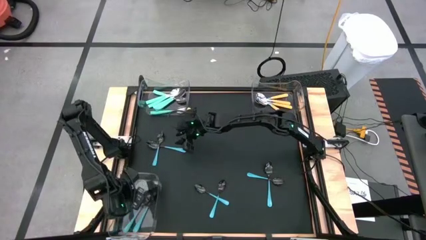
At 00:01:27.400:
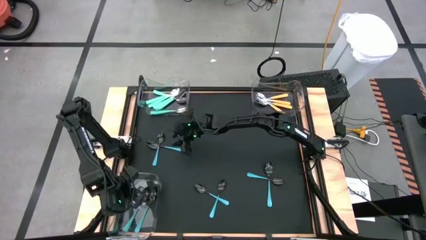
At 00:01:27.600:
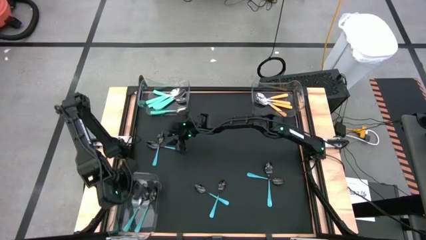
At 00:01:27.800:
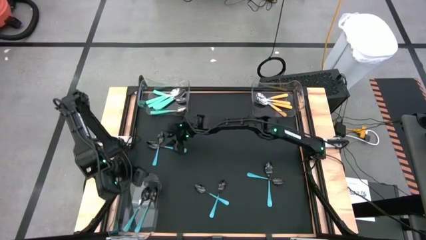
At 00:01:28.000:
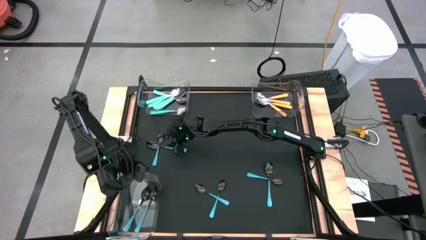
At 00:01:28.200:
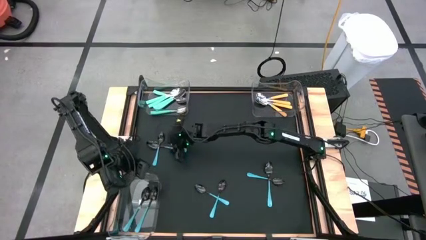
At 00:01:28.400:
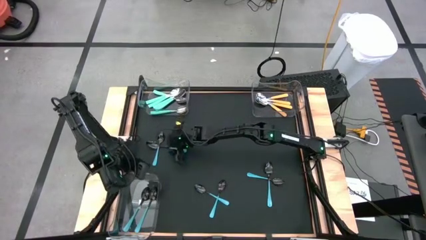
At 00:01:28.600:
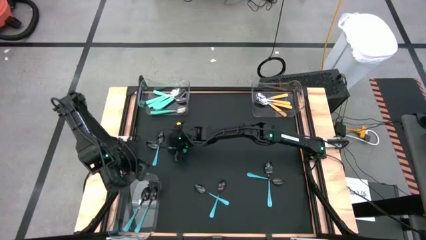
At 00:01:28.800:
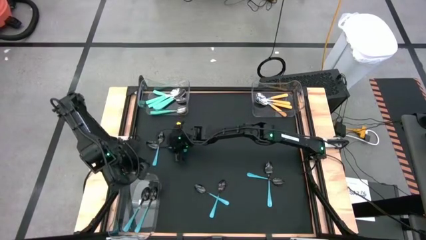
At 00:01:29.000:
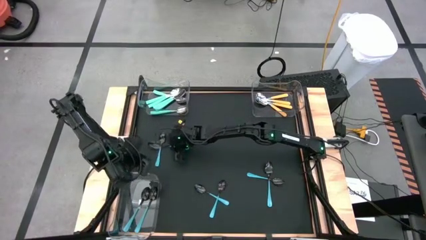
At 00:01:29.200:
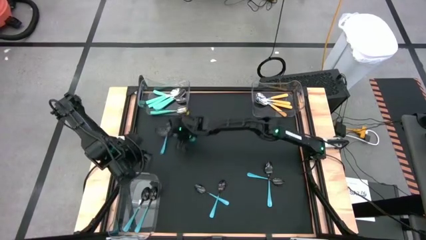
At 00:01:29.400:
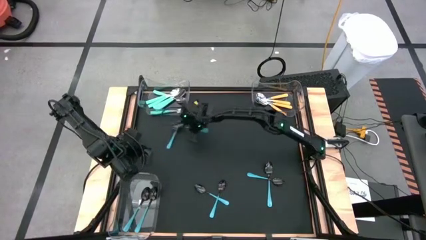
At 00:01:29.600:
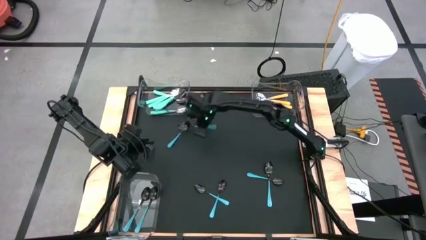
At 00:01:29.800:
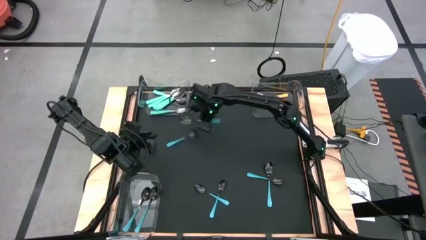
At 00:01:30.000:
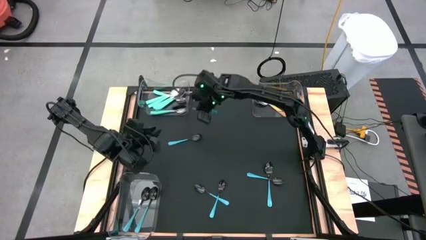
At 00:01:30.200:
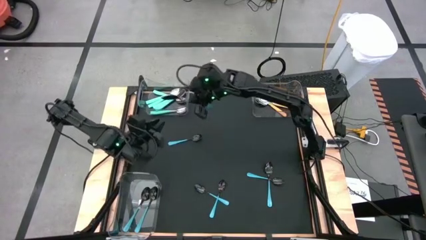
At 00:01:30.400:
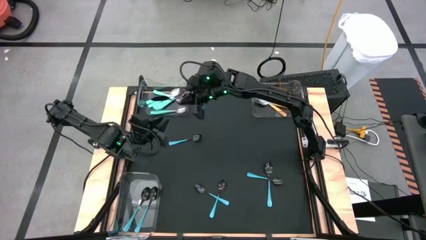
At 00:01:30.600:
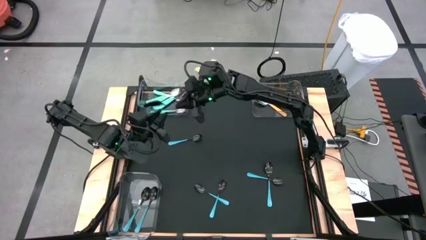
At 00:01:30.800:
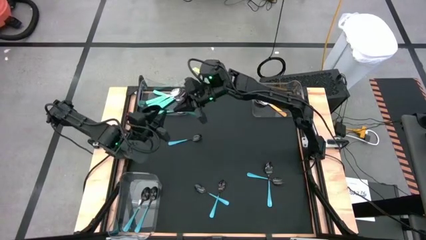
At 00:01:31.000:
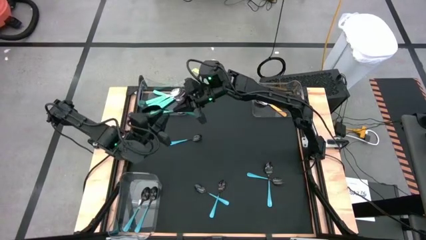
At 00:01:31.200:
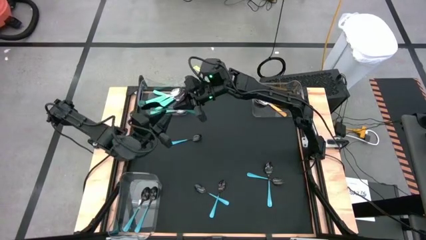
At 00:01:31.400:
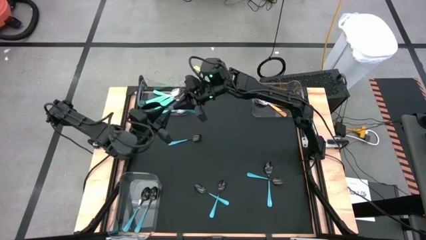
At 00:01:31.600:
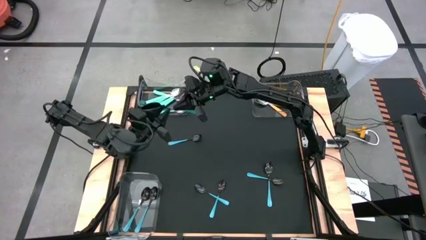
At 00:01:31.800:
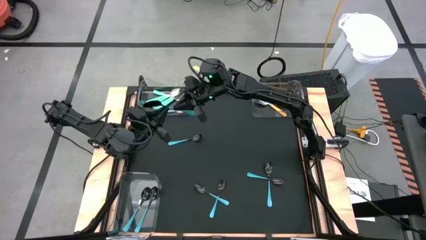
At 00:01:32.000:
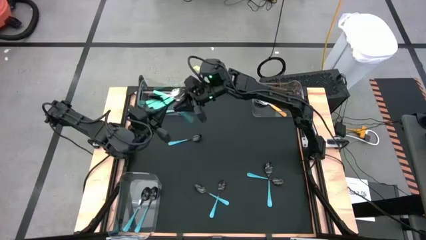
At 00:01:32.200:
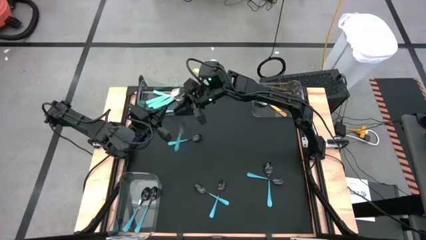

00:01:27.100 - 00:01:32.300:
Task: Sort silverware by color (type)
Put the blue spoon into the bottom transparent bin

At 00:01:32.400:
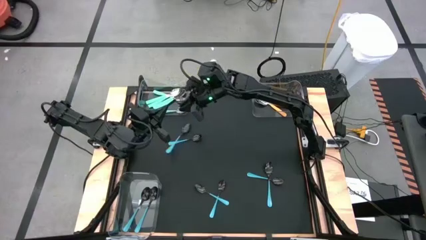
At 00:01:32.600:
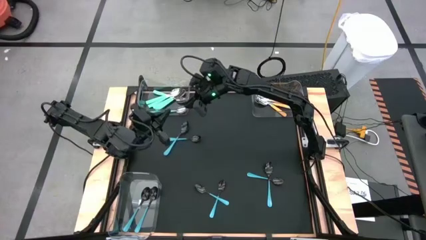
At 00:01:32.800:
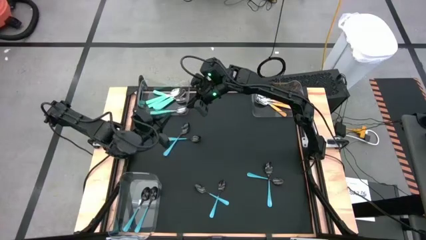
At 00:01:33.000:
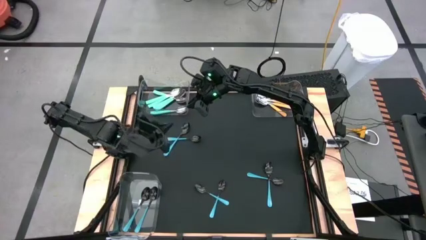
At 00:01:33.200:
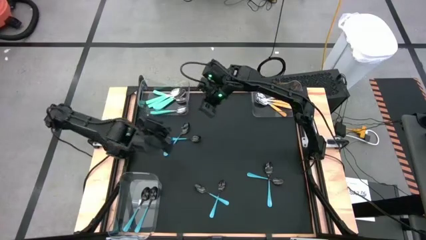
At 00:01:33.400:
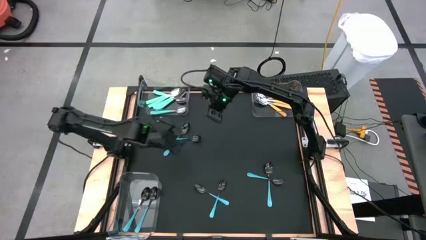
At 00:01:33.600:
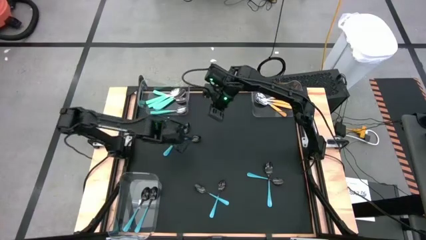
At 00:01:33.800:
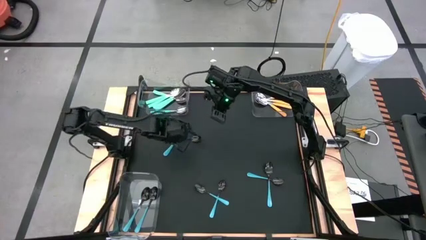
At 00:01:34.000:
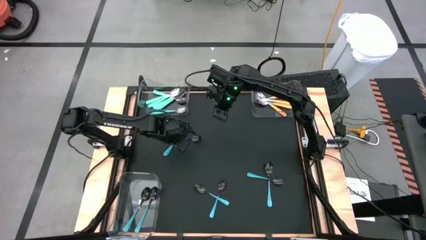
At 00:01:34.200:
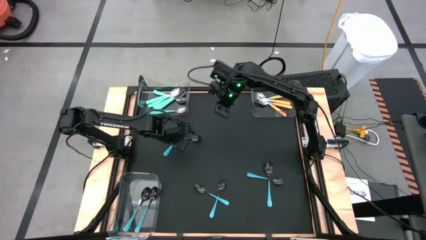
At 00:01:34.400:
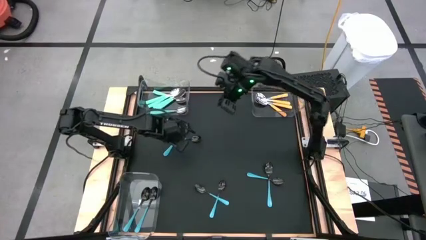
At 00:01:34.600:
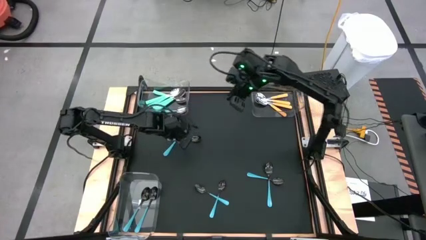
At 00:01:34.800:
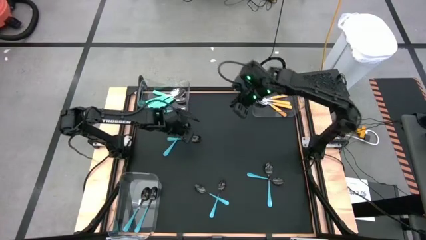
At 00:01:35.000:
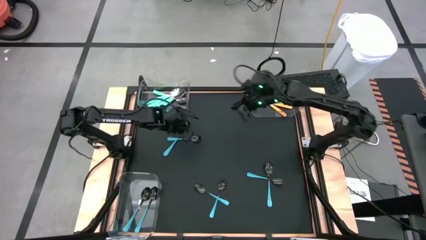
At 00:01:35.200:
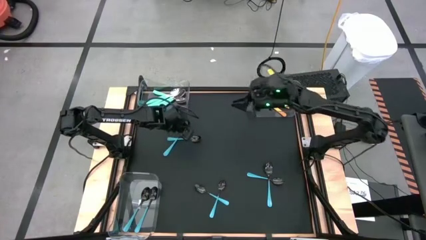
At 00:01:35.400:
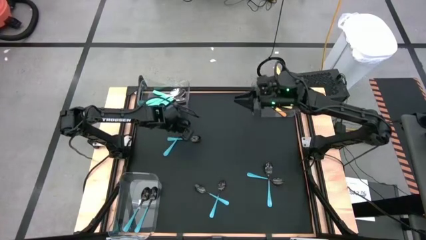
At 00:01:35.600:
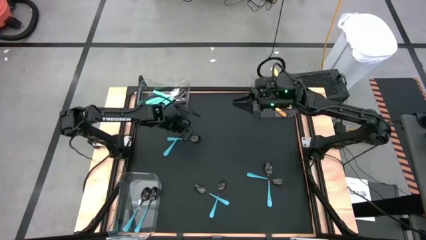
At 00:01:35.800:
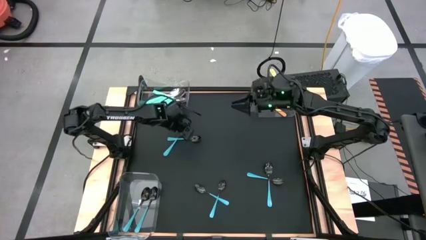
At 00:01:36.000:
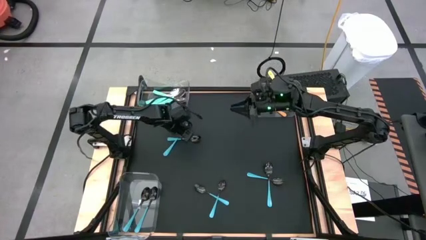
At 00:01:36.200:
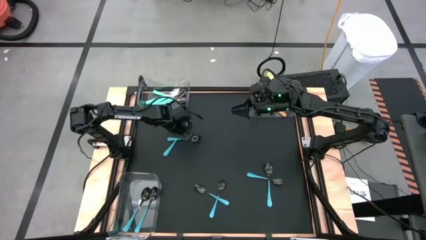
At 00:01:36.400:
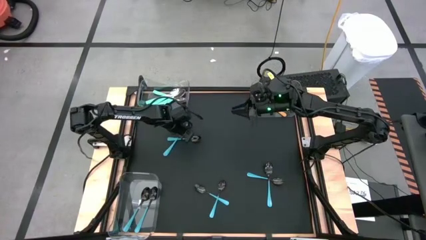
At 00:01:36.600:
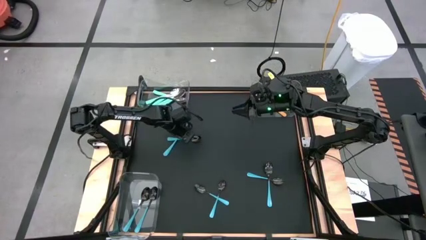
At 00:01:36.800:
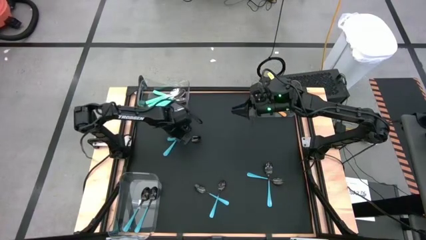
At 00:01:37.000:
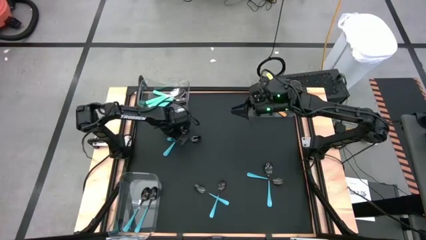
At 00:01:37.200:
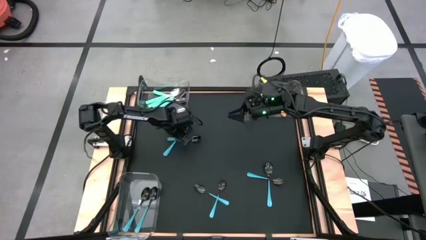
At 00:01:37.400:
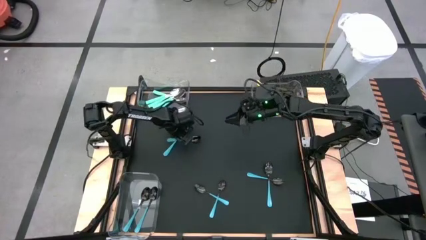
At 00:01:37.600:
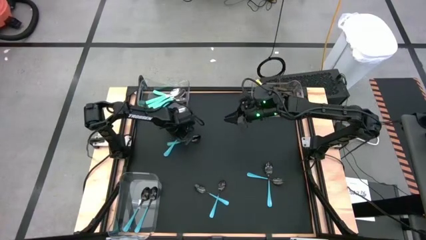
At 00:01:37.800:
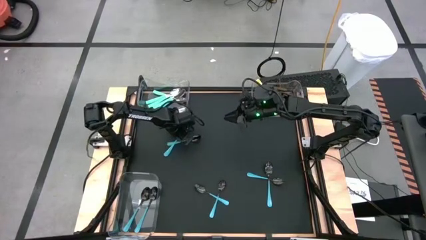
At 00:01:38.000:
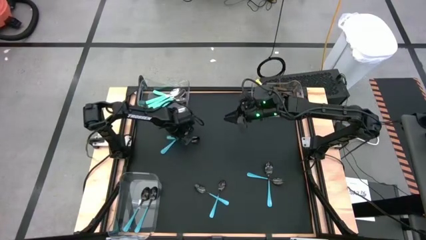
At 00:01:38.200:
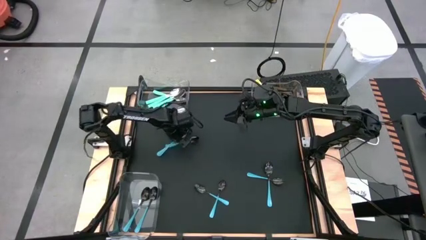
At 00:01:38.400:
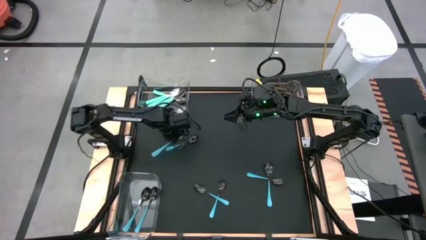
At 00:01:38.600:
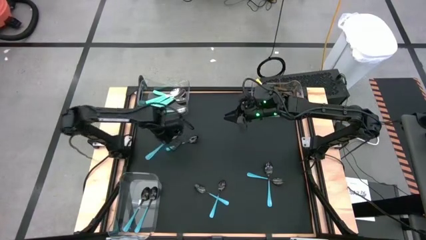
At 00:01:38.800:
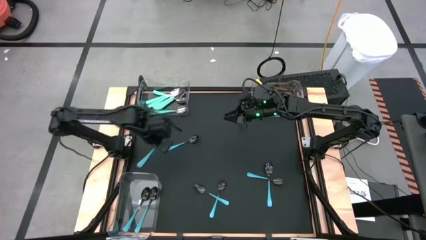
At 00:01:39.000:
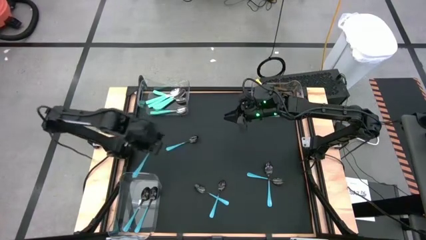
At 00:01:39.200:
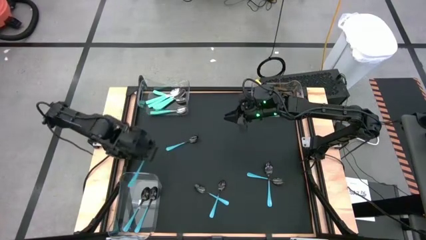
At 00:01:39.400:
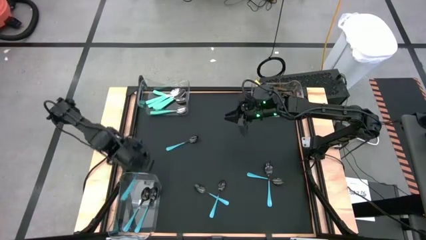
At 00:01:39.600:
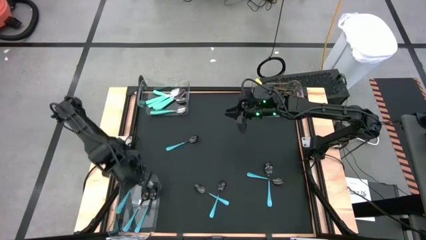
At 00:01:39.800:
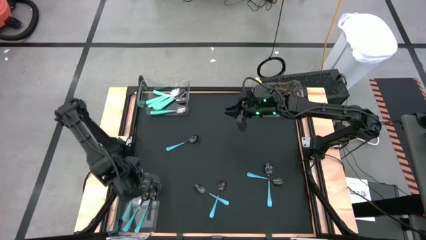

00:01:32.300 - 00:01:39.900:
Put the blue spoon into the bottom transparent bin

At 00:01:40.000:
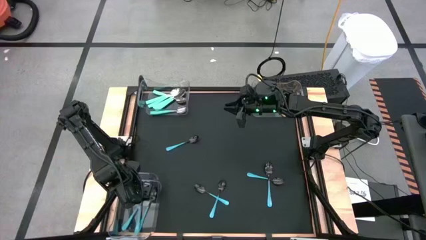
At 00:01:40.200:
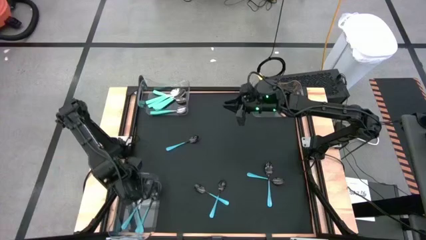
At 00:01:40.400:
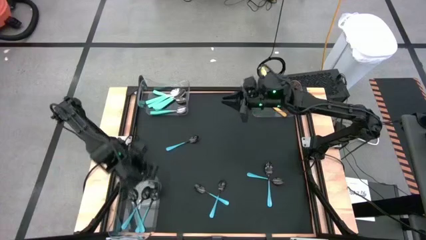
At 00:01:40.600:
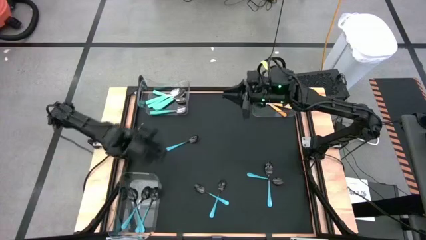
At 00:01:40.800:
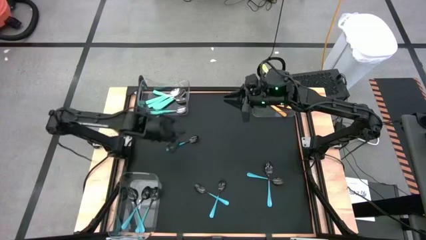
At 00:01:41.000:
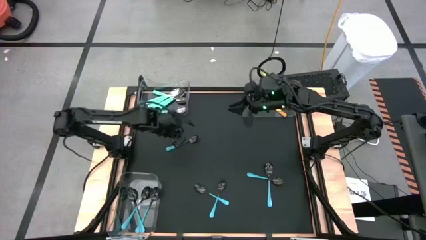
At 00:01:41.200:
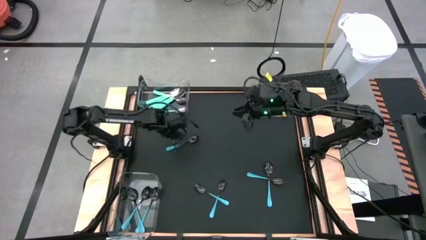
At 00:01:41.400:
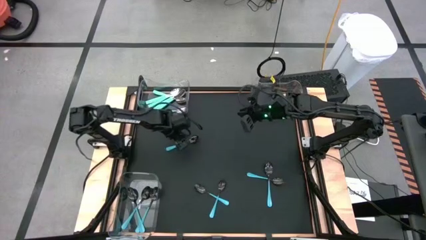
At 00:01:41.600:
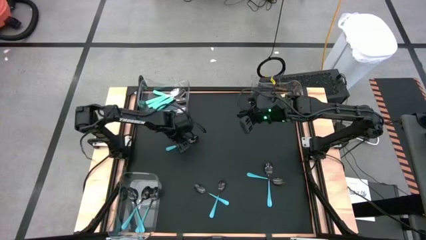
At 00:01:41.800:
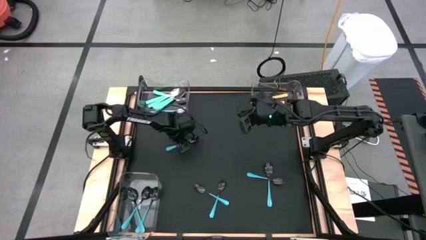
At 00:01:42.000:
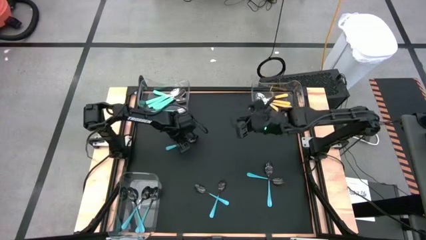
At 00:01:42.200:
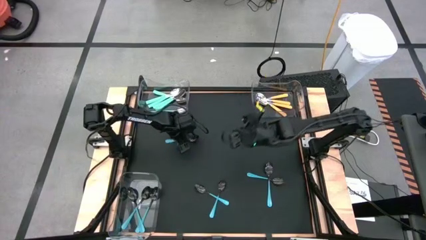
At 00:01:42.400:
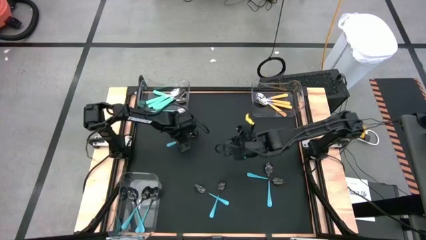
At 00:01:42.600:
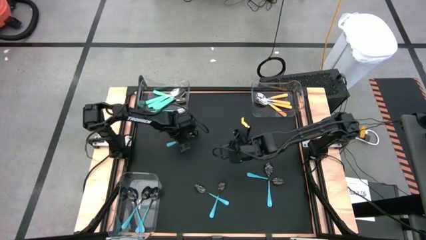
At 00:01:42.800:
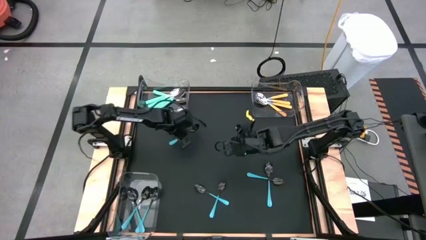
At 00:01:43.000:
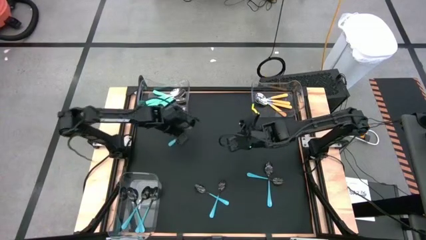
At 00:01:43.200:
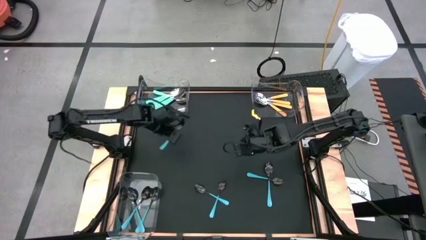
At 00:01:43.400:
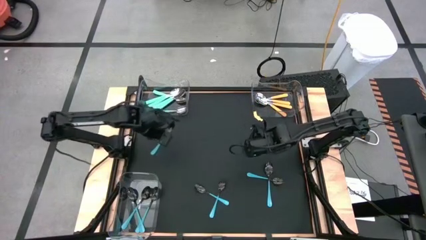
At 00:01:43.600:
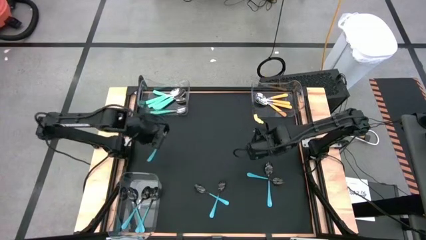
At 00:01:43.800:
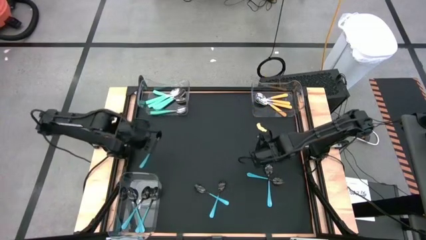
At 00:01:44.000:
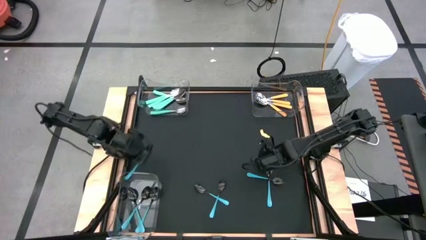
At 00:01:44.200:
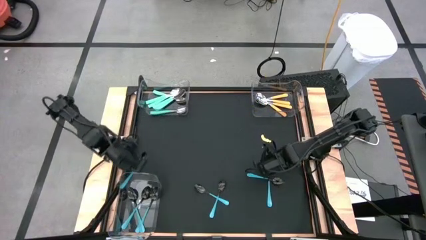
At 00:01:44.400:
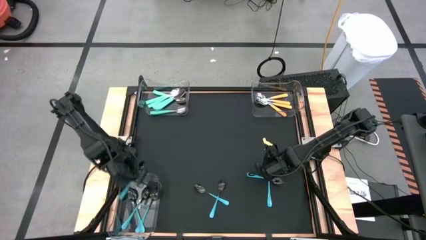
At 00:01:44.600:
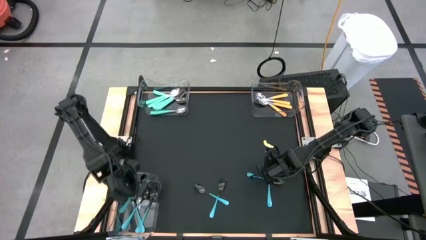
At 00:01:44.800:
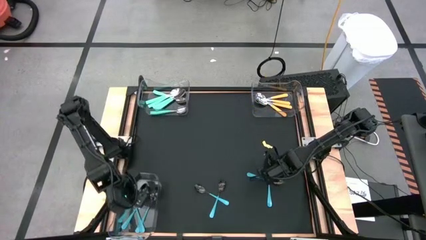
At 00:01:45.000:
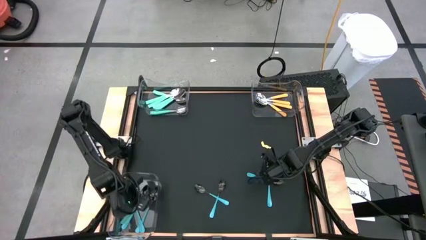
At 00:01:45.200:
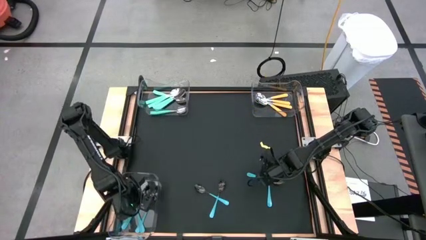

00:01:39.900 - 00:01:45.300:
Put the blue spoon into the bottom transparent bin
